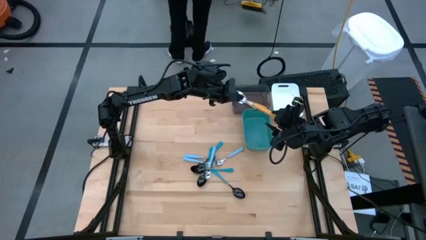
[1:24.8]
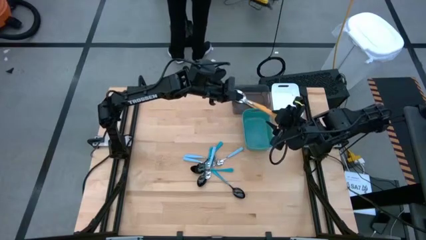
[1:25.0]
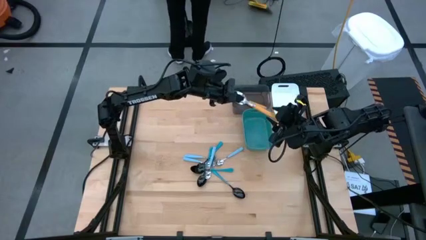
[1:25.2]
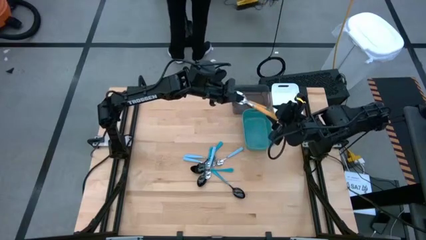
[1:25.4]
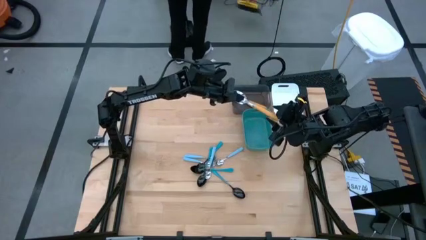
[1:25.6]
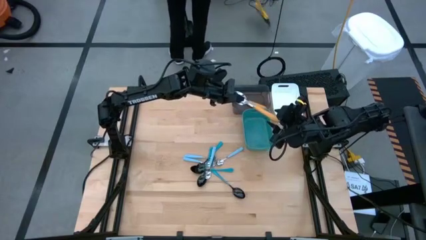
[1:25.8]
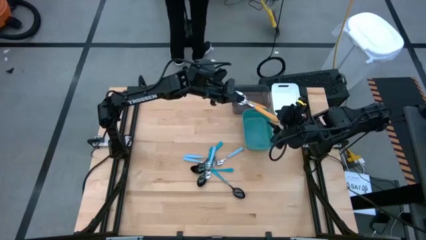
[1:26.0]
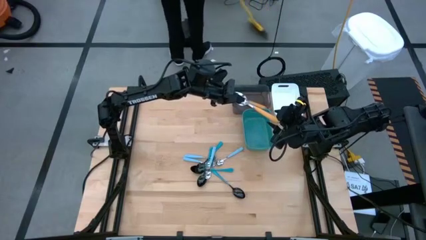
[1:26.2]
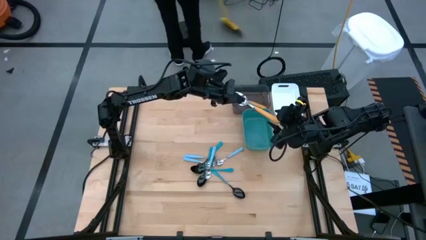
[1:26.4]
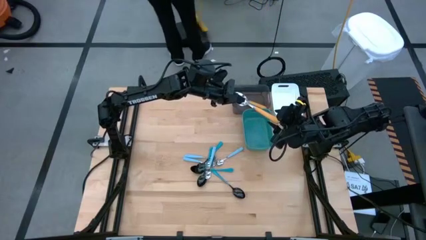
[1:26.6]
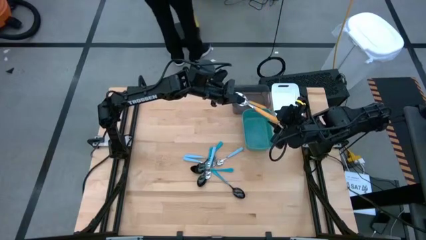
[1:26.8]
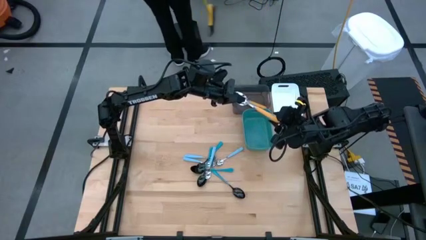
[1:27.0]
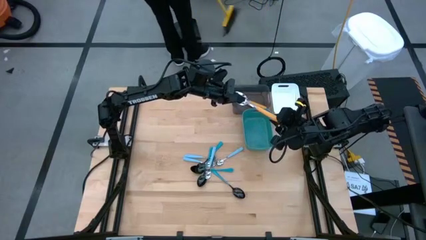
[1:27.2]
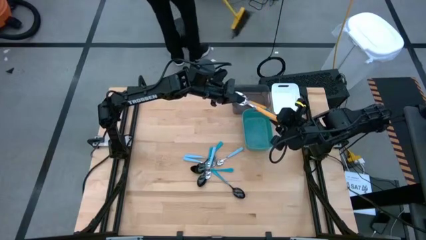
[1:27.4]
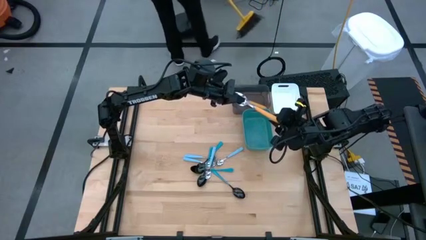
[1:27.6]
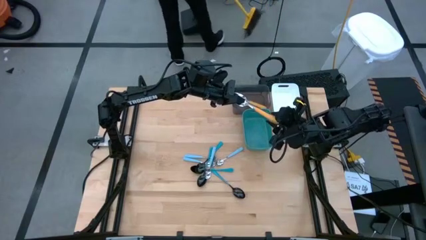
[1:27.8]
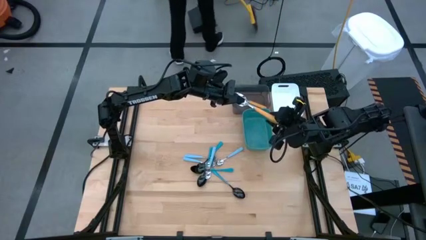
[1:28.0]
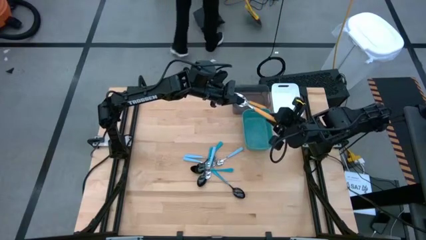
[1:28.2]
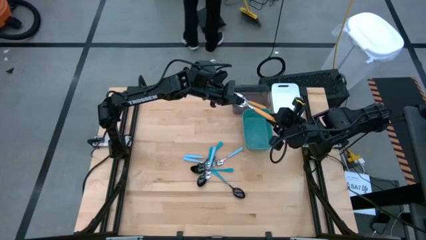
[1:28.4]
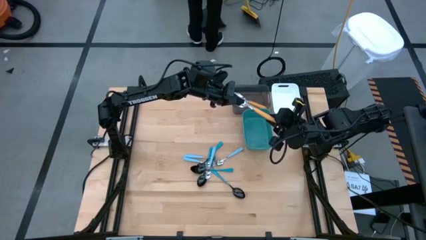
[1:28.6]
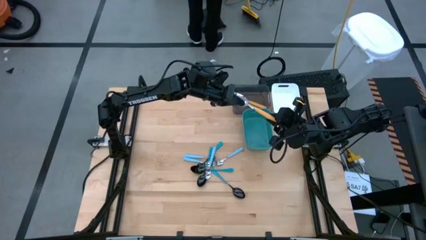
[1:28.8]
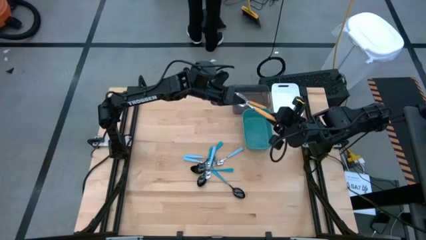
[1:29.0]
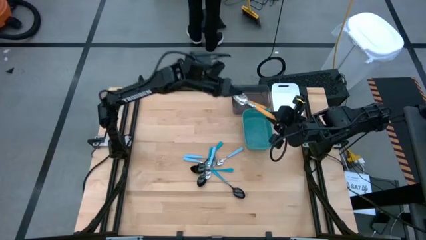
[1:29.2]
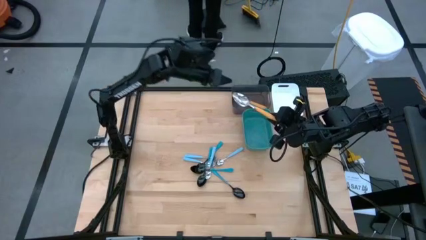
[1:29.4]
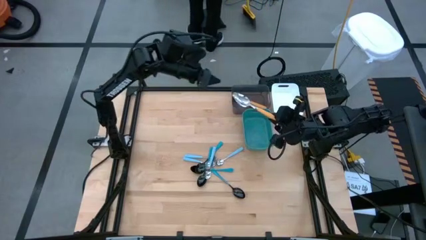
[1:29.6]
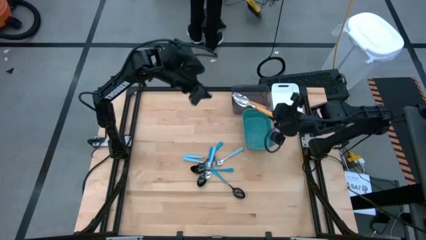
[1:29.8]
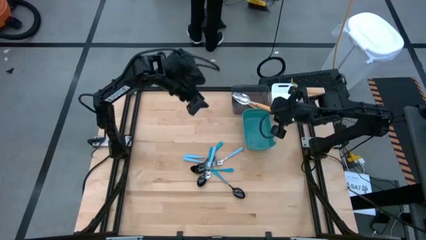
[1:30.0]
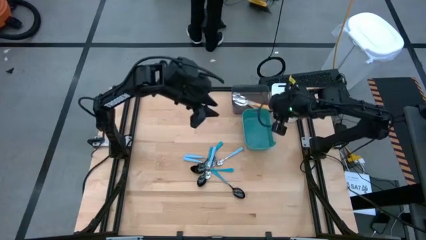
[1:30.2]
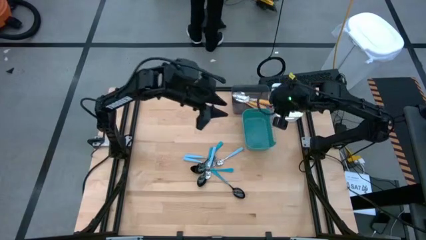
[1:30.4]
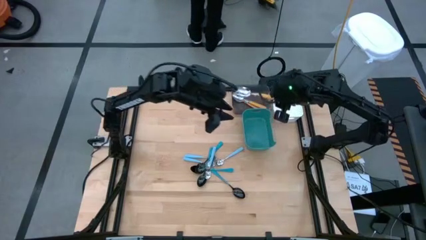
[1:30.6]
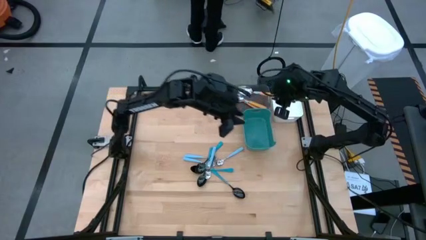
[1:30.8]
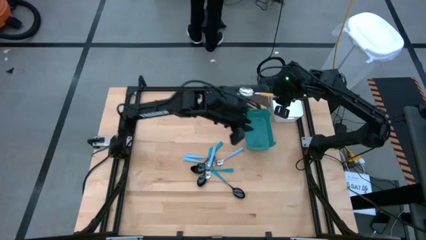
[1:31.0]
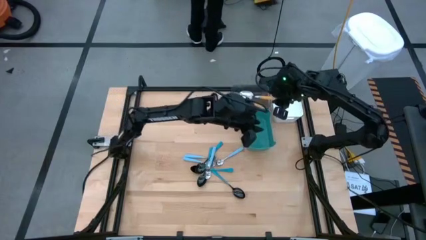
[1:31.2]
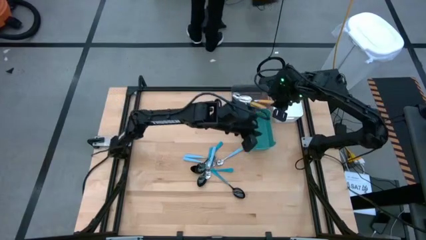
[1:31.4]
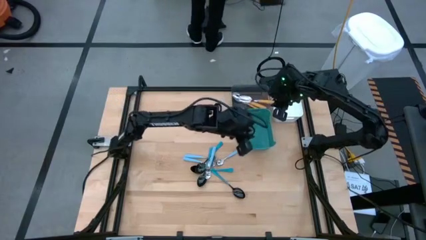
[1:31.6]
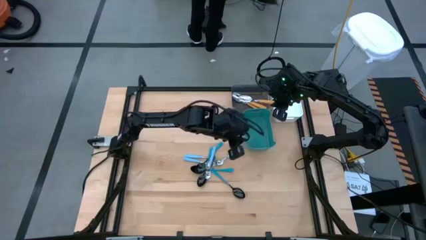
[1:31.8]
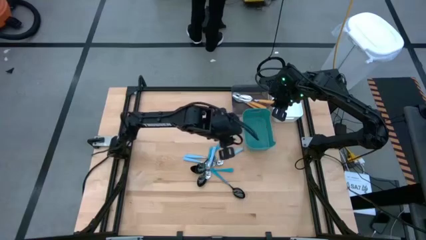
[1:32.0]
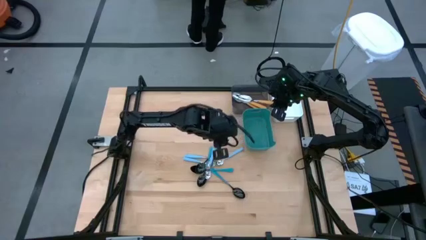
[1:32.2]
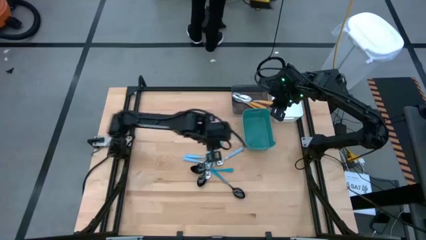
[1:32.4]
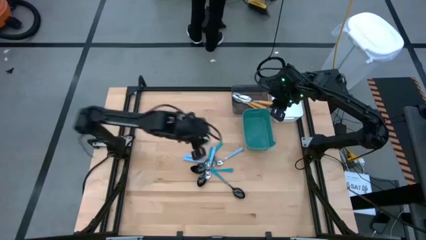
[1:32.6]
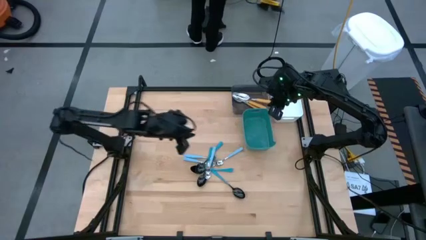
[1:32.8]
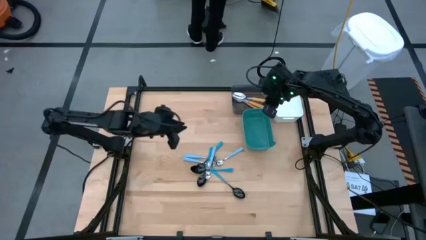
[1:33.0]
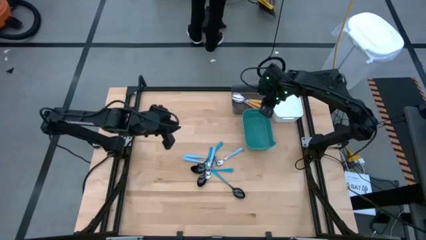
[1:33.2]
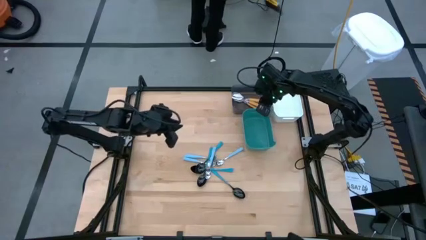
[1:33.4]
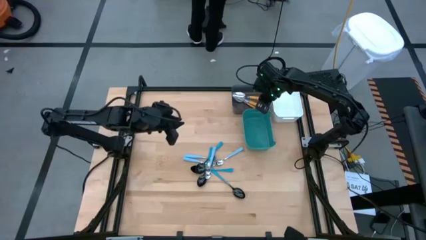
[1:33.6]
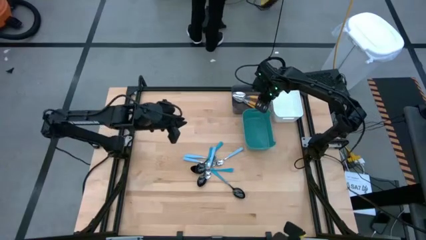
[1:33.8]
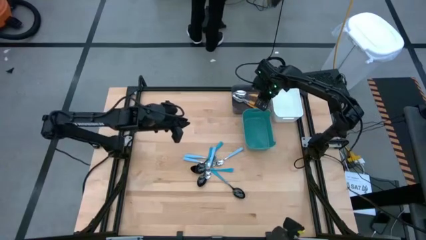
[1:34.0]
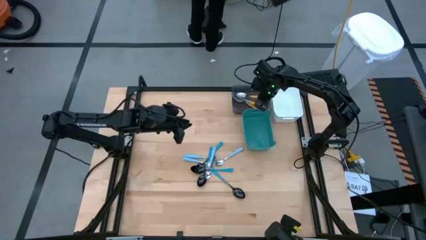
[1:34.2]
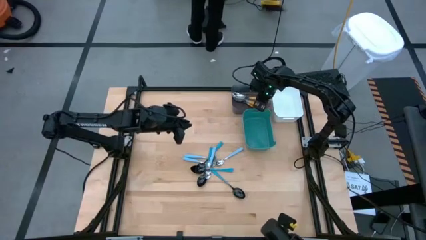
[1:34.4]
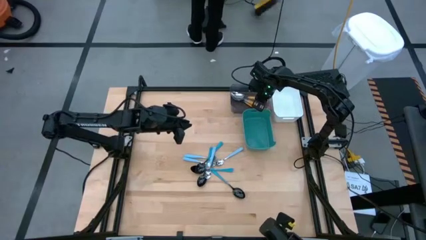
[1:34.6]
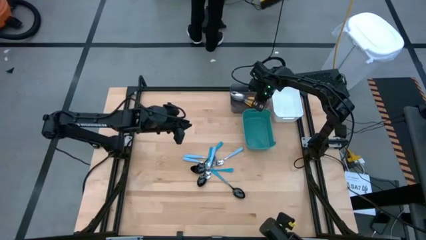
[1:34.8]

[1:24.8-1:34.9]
Task: Sort silverware by color (type)
Put the orange spoon into the black bin

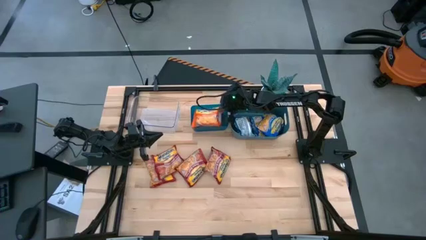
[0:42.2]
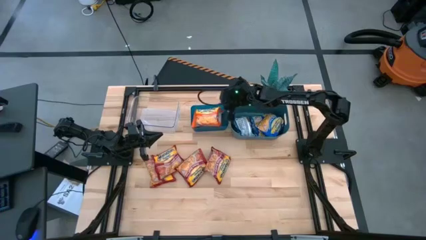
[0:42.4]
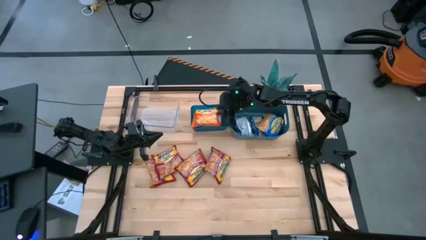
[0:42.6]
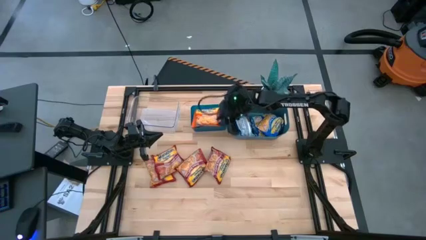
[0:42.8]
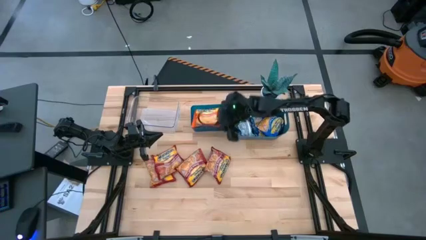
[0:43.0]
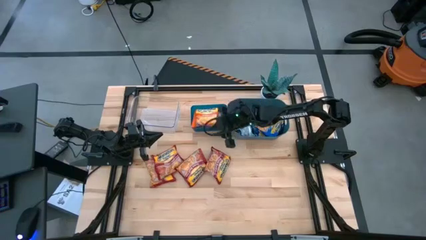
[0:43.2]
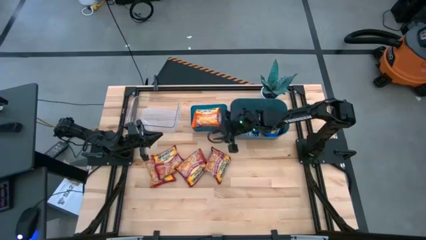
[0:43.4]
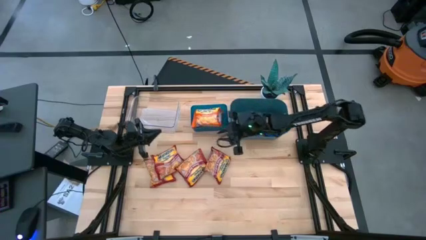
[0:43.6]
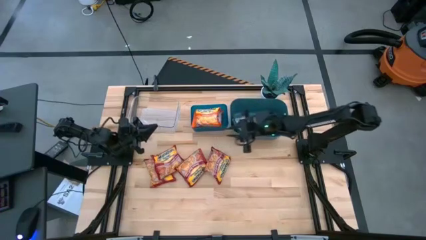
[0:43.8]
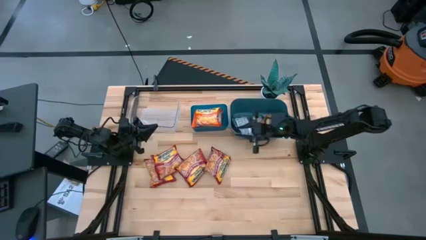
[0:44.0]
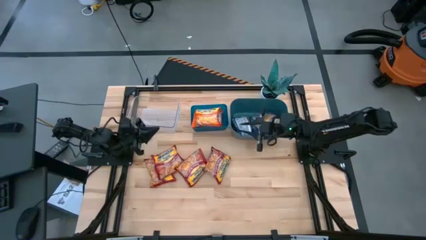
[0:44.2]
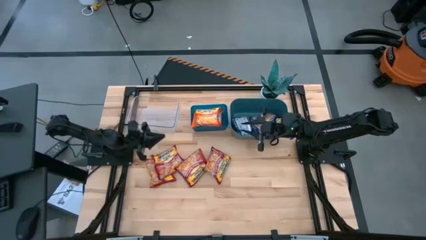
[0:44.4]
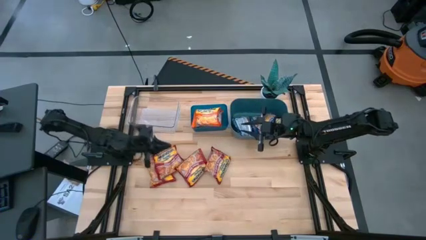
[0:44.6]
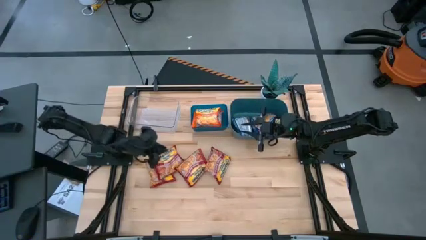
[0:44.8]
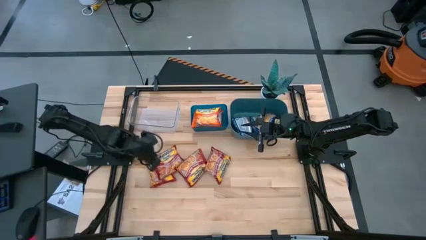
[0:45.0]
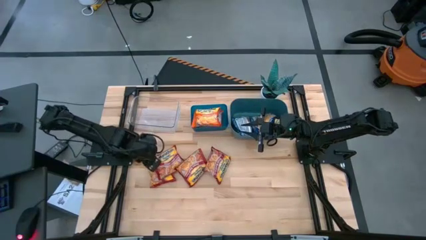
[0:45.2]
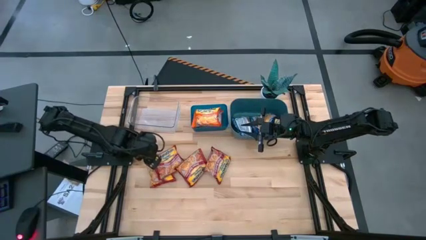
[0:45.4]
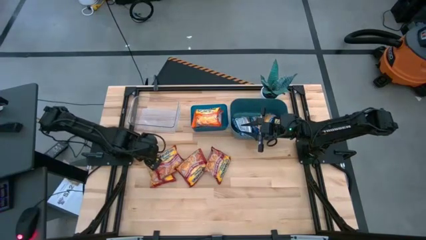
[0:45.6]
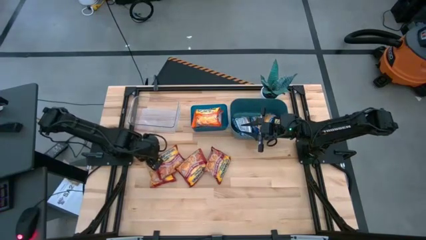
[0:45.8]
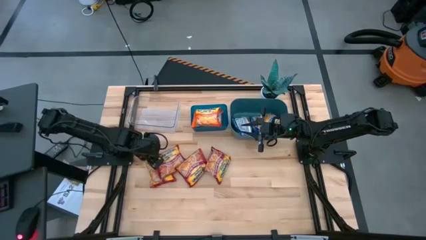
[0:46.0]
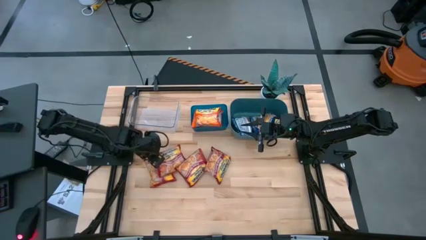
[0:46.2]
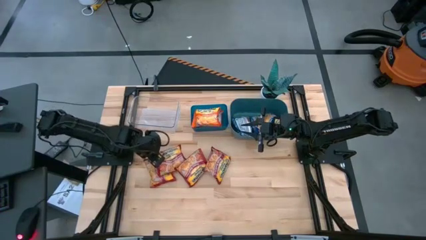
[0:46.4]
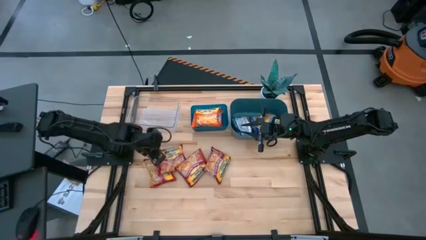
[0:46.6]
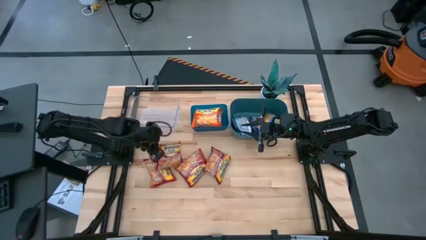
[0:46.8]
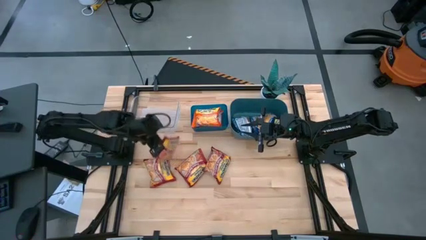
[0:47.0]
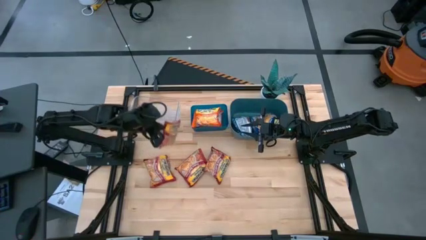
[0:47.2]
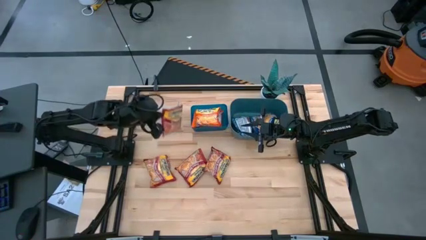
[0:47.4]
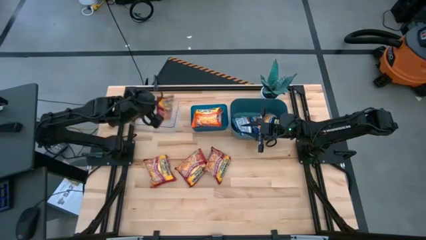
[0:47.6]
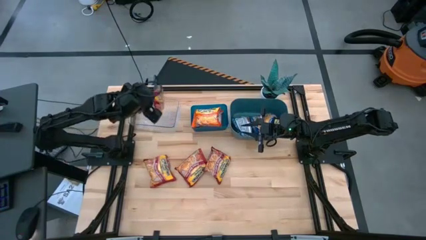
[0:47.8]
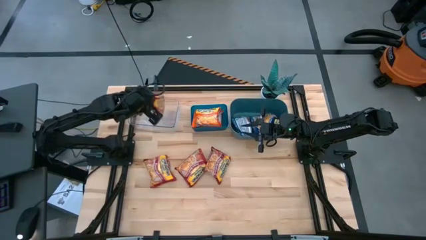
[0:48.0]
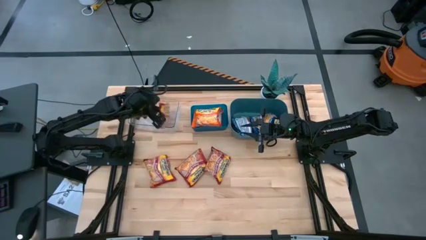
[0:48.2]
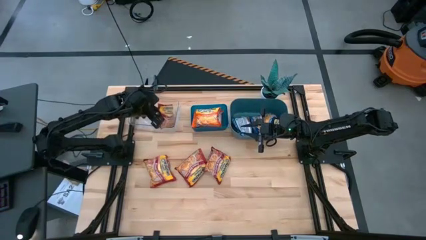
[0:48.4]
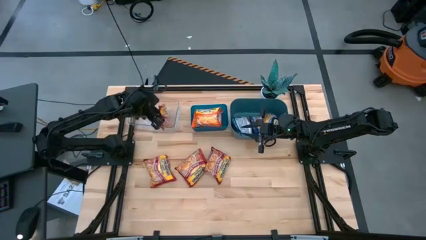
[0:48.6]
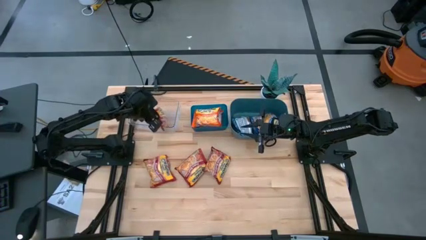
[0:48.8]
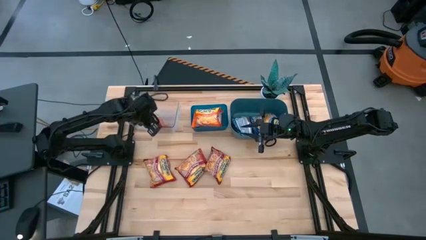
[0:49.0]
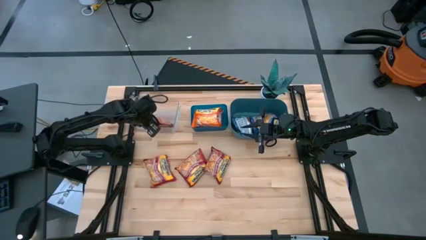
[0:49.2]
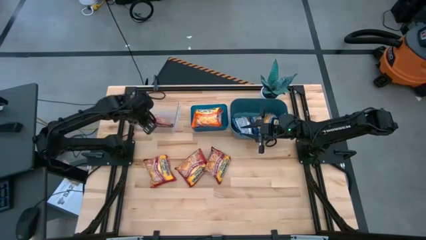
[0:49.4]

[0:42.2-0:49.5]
Task: Sort Maruchan noodles
Put the red noodle pack into the transparent bin
